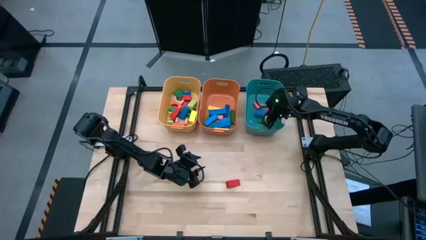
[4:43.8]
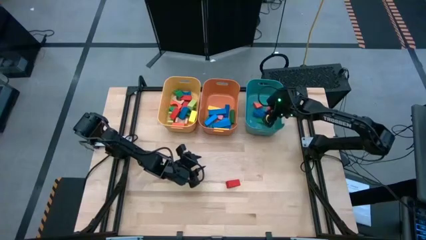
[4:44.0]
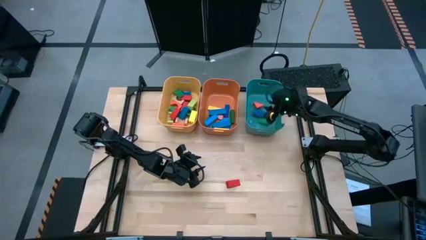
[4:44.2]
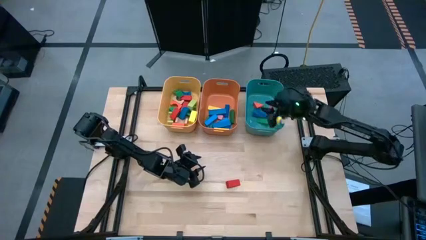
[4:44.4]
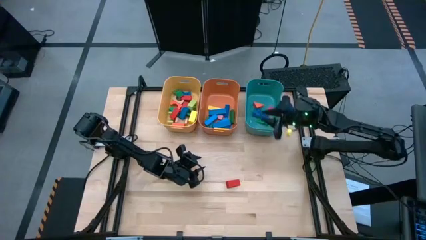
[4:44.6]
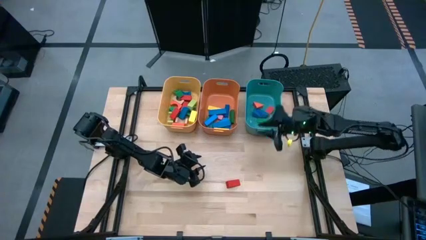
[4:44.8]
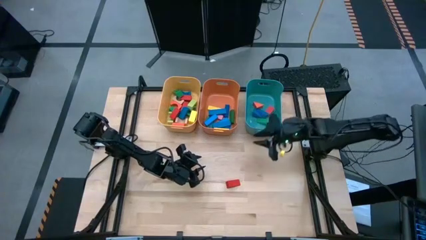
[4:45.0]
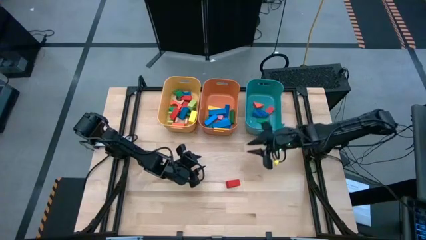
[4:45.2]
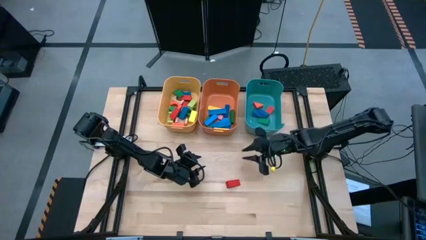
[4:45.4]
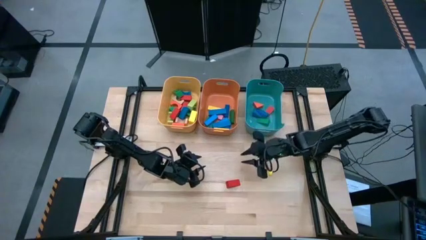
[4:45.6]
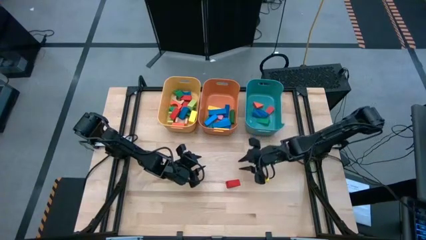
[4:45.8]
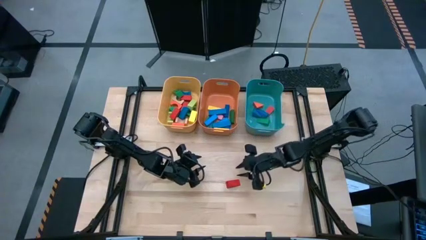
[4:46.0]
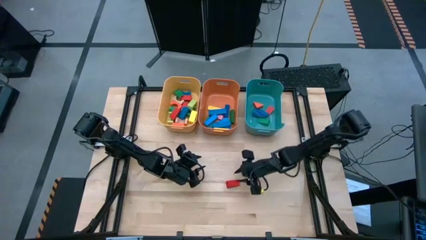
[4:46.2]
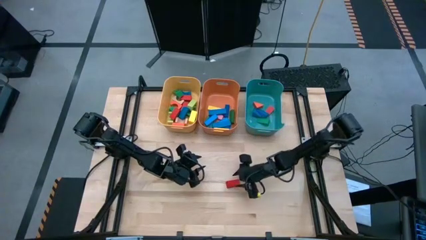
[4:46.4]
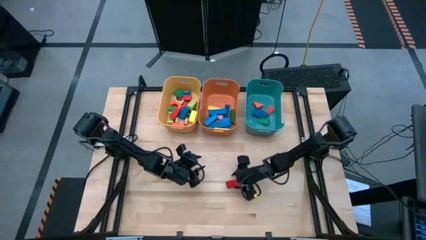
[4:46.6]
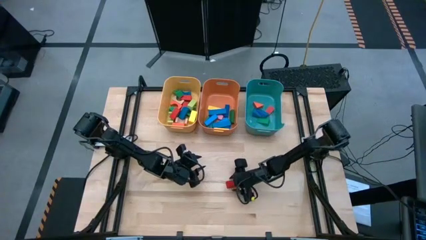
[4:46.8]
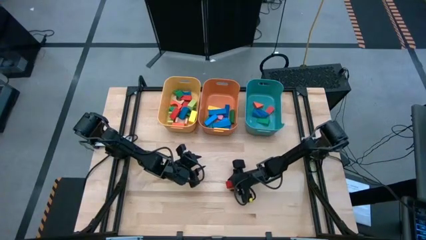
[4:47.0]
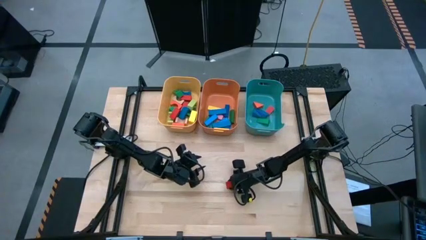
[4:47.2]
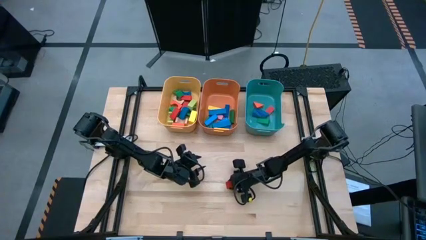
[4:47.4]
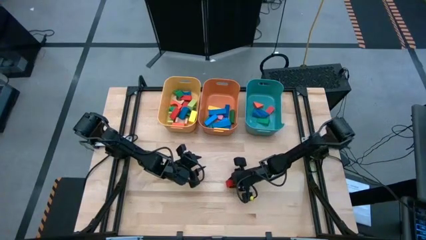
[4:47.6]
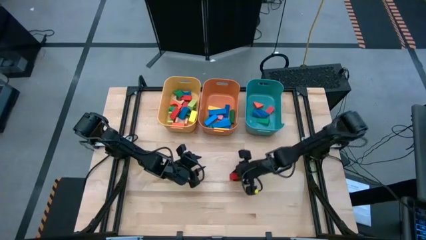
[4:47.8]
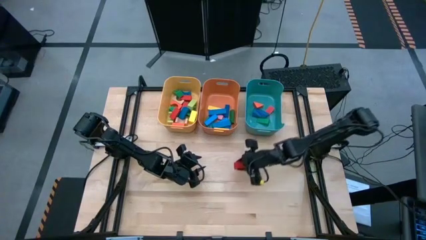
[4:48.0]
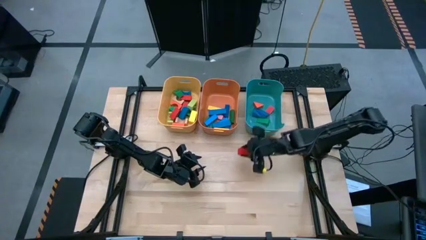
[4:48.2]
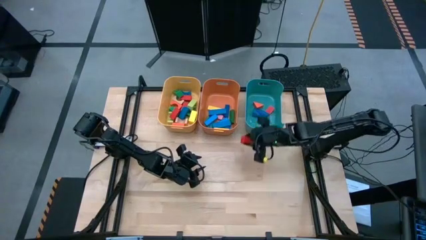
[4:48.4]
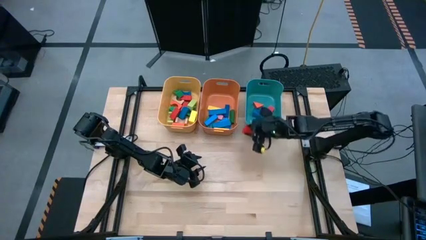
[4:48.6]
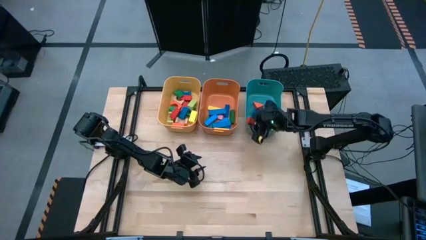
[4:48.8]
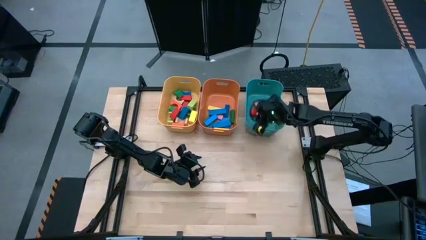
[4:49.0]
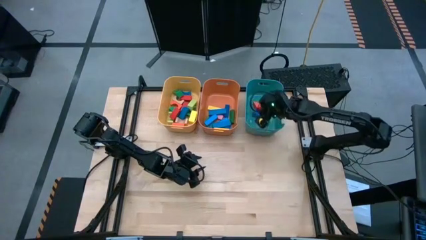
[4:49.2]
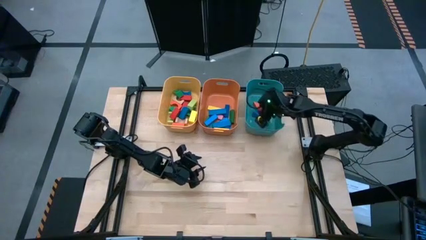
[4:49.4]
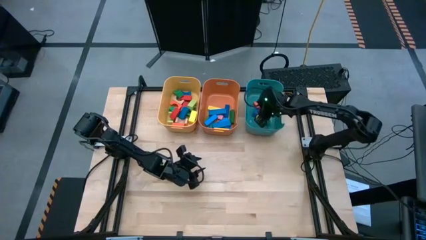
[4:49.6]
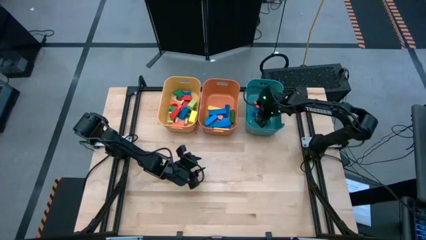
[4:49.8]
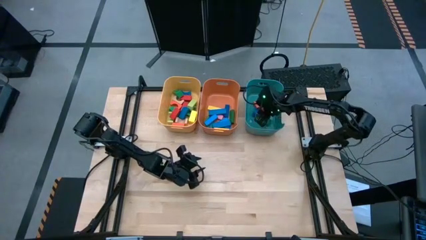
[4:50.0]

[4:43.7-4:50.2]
Task: Sort blocks by size
Put the red triangle block into the blue bin

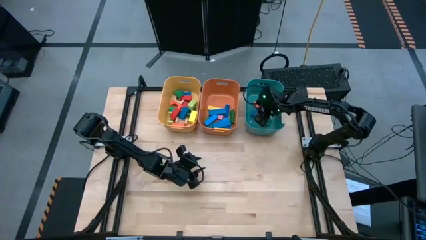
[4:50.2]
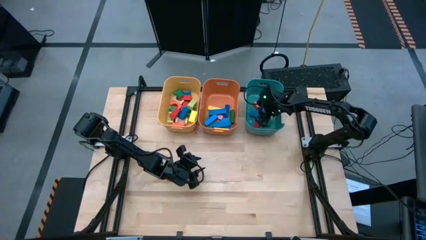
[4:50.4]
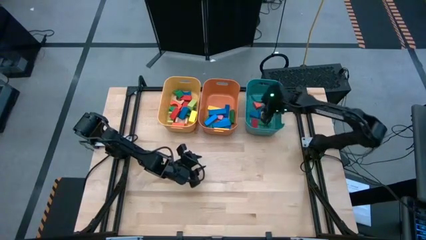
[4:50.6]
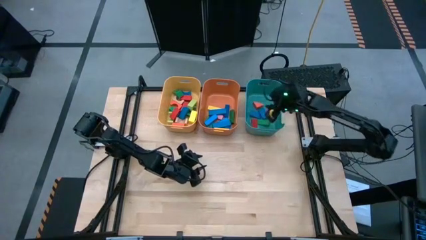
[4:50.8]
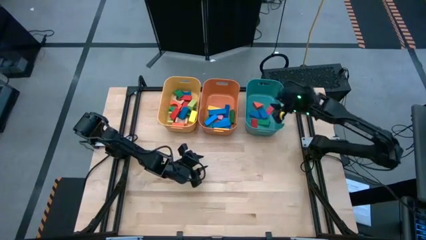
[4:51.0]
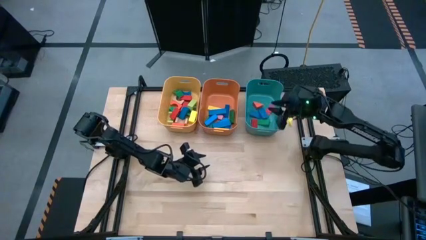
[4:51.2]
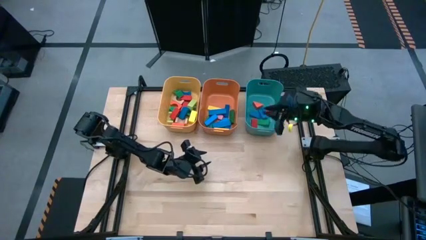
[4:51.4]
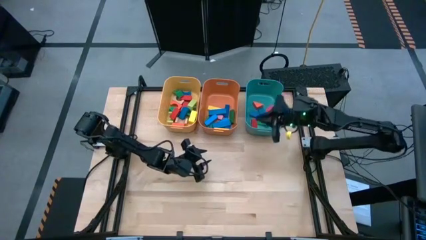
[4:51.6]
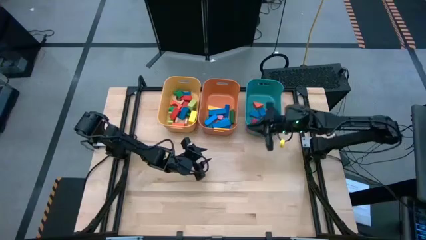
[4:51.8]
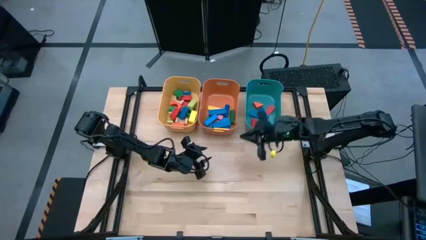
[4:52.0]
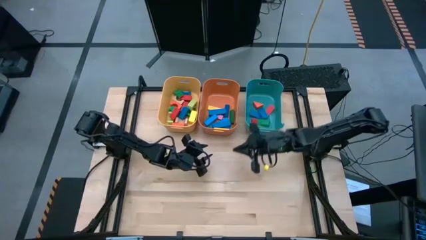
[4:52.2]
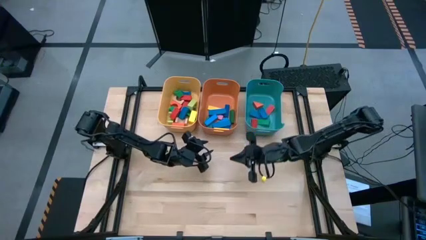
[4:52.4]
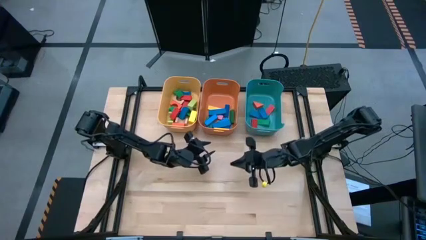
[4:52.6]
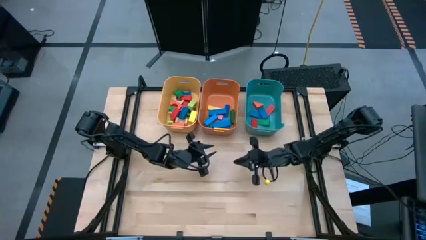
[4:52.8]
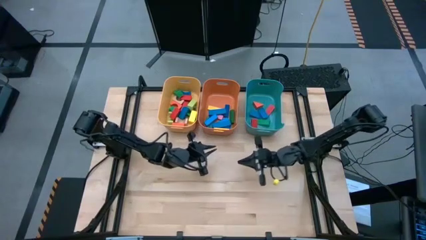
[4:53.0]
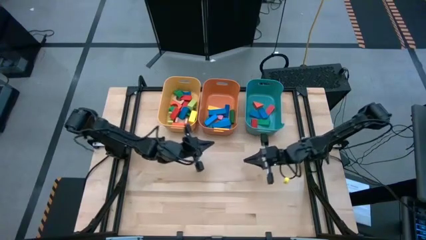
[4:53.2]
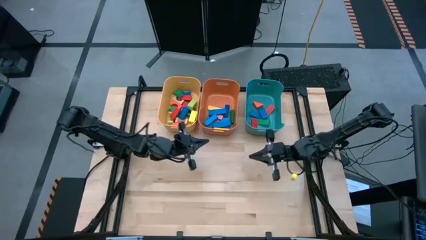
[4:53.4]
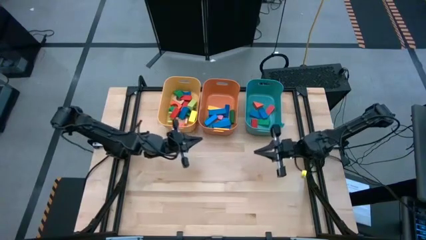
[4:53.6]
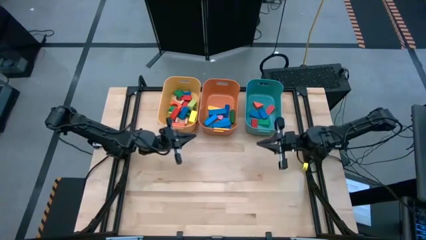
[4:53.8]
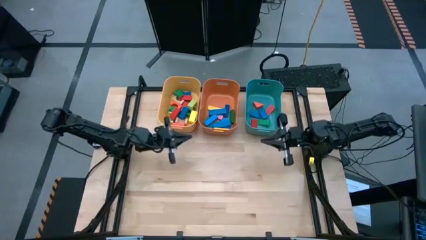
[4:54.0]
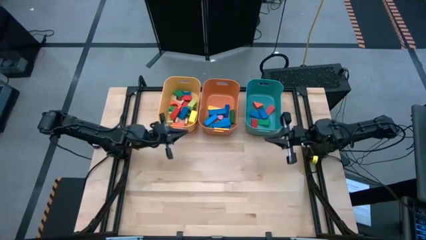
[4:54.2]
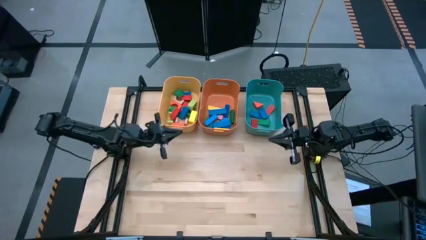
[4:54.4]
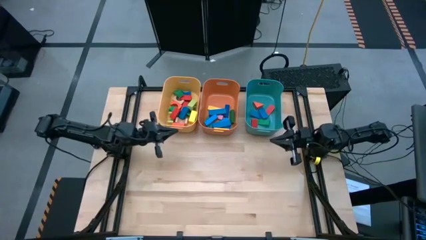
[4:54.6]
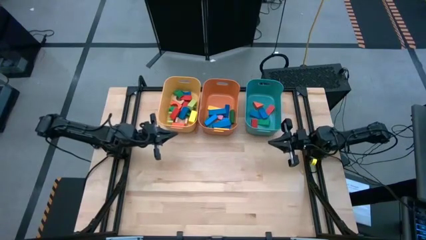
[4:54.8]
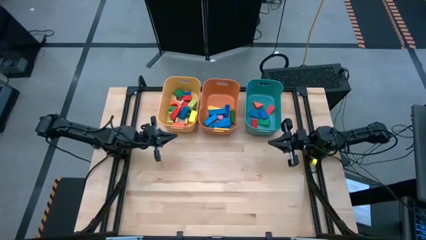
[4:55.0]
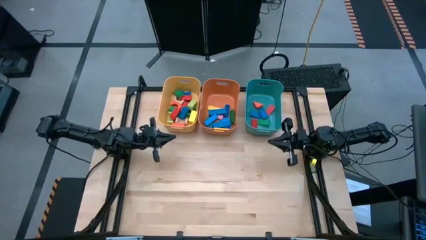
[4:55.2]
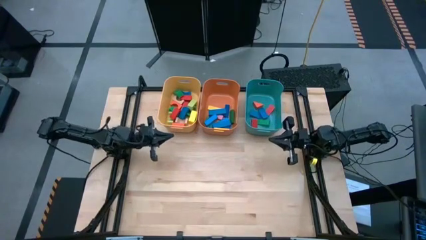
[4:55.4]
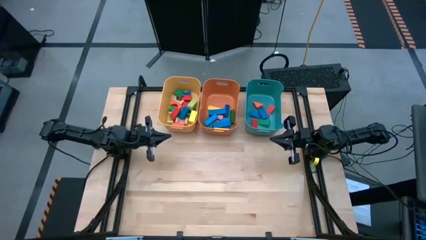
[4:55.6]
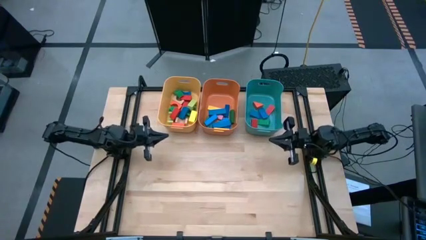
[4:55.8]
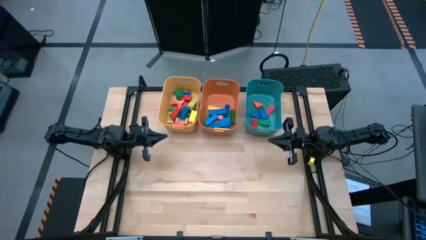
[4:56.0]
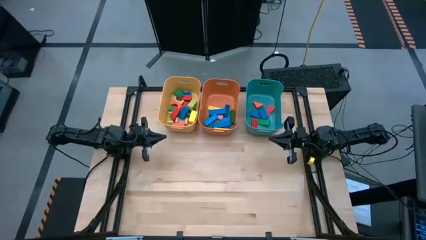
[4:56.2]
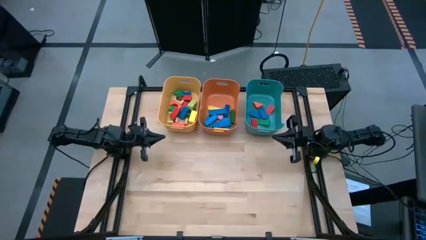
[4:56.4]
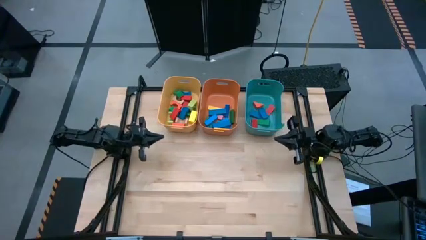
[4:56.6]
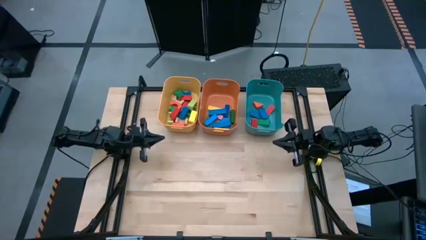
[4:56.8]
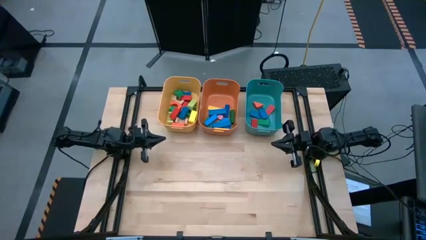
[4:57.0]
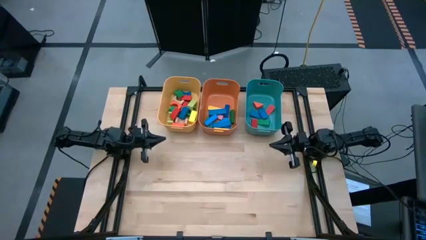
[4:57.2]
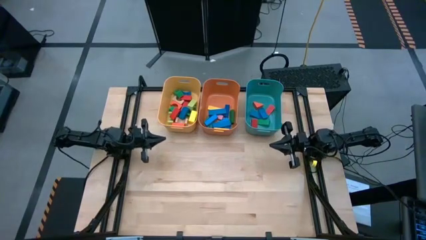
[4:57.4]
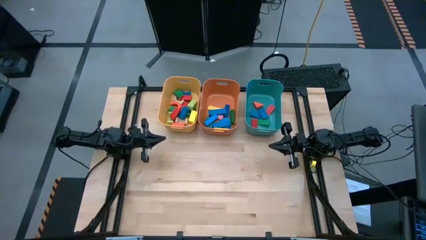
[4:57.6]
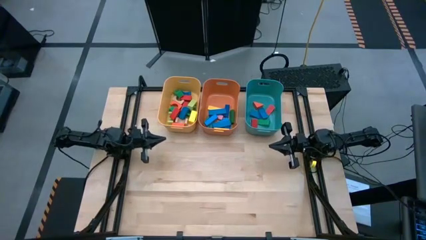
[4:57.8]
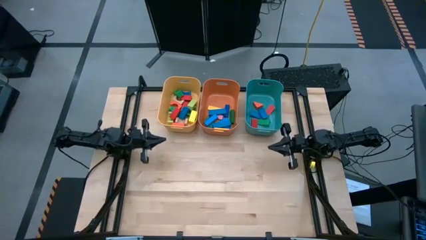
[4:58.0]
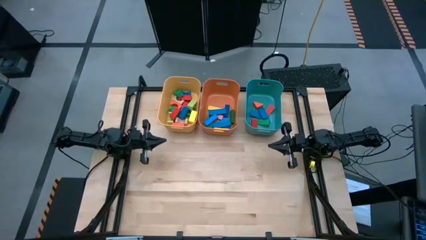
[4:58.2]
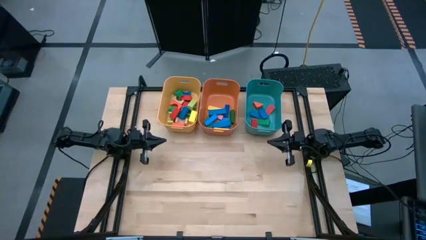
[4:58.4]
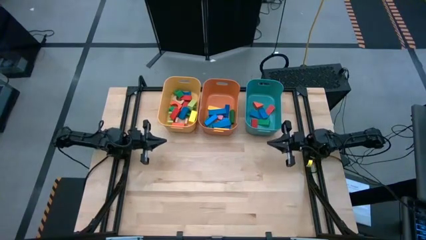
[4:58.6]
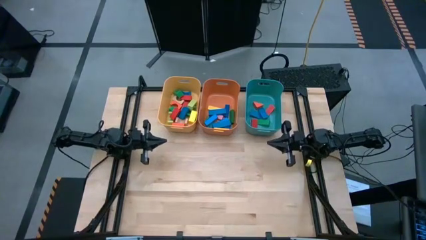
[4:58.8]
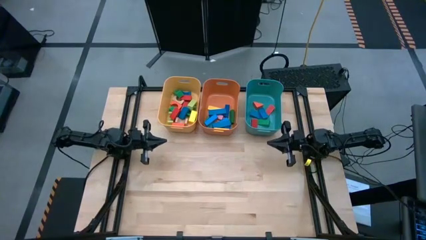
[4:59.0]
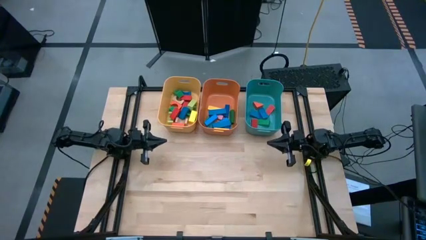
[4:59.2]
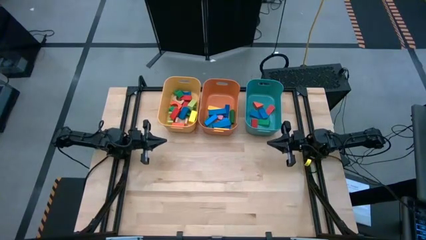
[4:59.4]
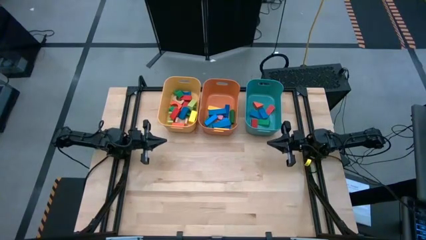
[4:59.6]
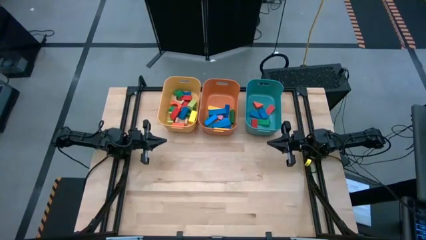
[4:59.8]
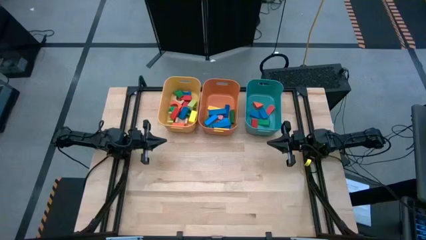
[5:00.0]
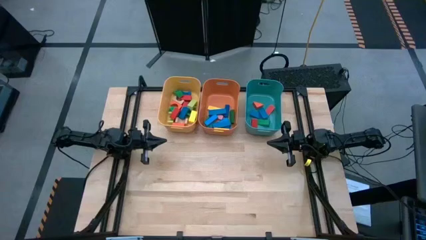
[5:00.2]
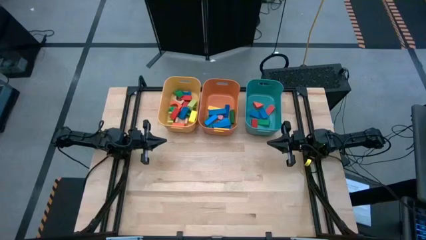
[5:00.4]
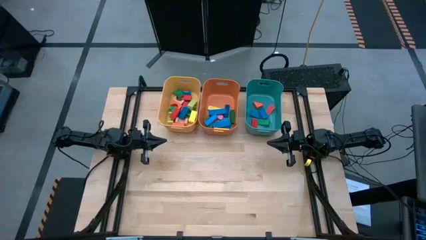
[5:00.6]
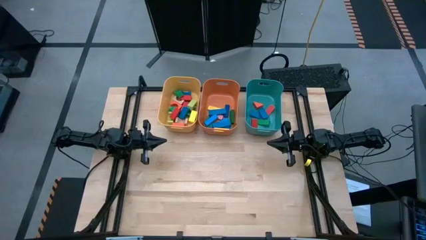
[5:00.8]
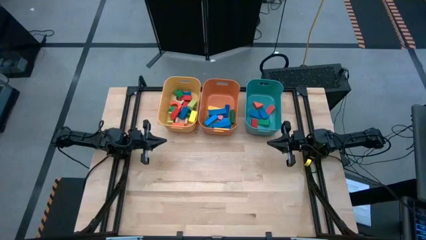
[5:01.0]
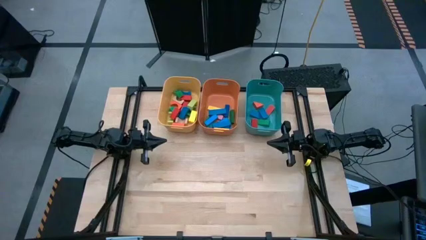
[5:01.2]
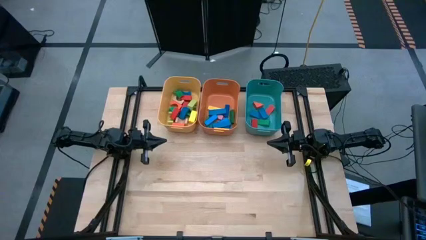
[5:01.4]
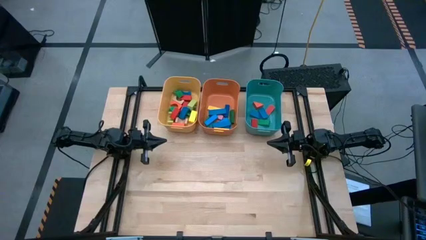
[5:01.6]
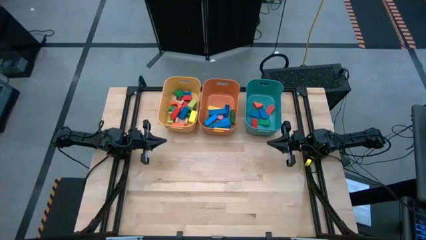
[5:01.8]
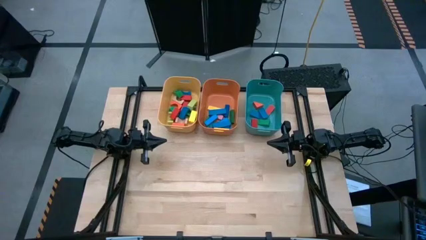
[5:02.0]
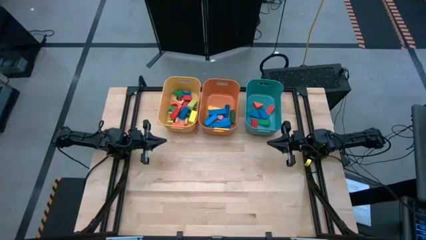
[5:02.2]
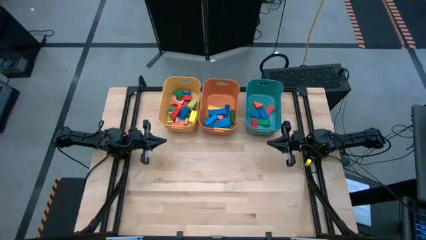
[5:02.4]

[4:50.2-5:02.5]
Return to Home Position
